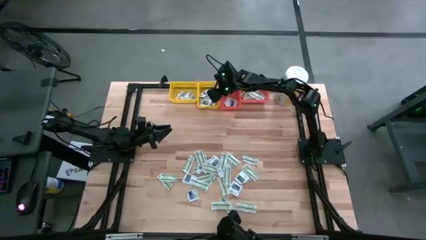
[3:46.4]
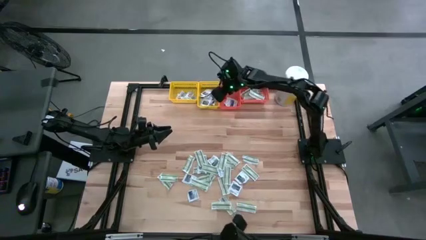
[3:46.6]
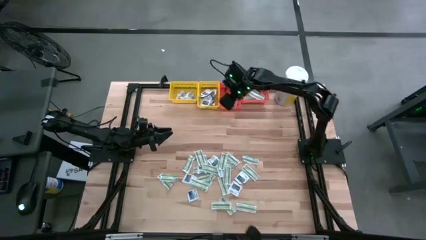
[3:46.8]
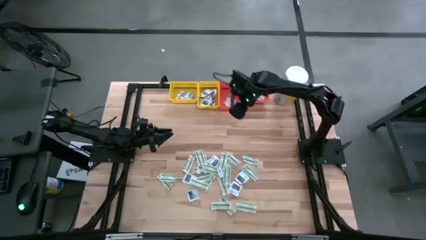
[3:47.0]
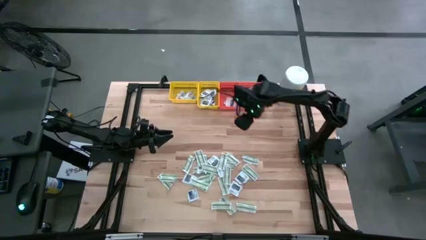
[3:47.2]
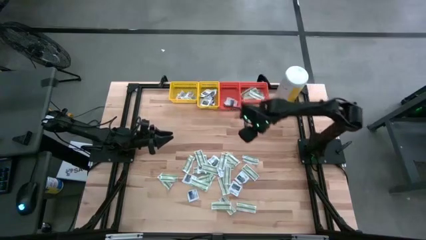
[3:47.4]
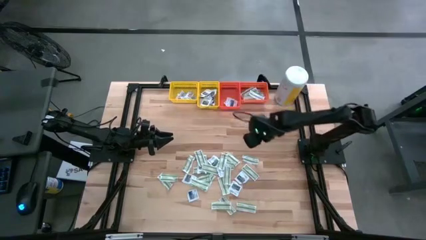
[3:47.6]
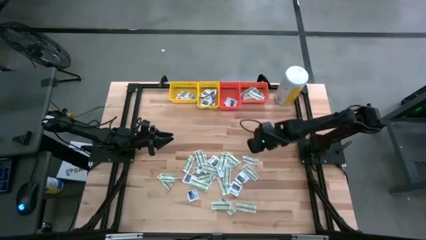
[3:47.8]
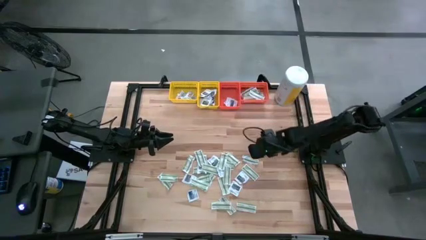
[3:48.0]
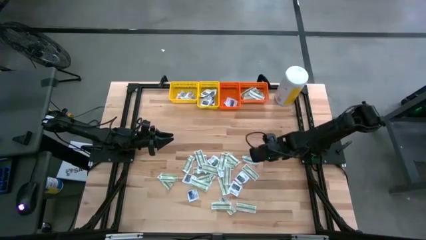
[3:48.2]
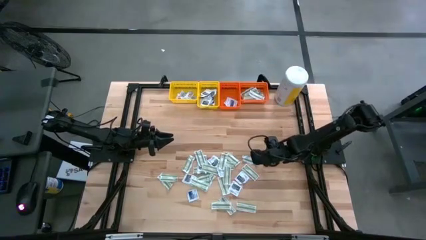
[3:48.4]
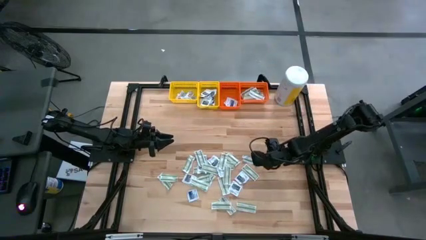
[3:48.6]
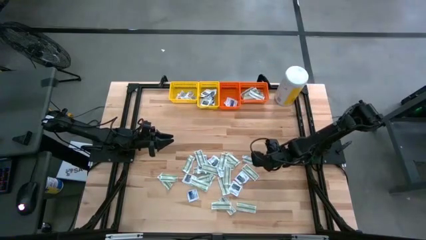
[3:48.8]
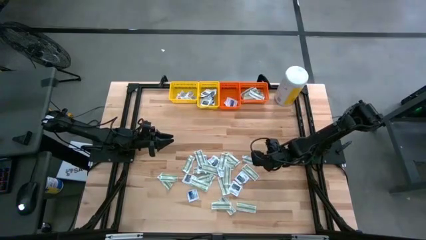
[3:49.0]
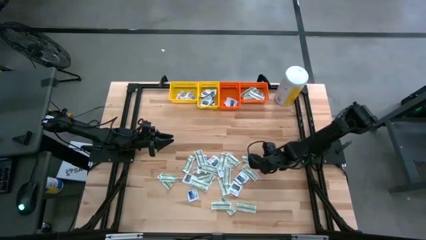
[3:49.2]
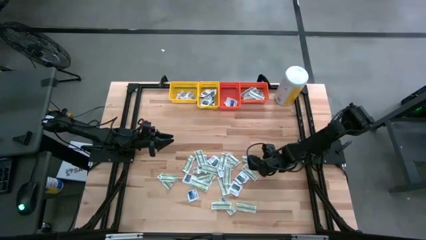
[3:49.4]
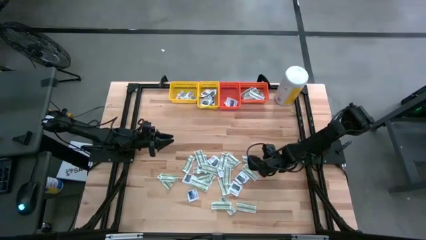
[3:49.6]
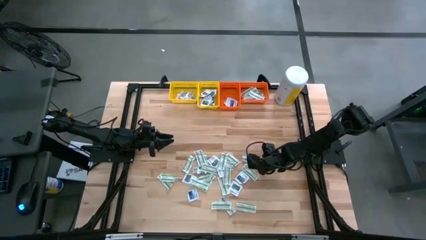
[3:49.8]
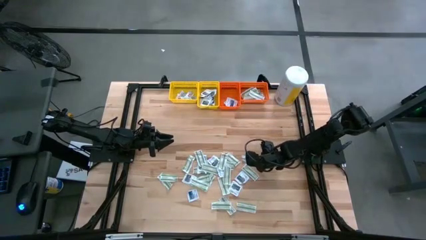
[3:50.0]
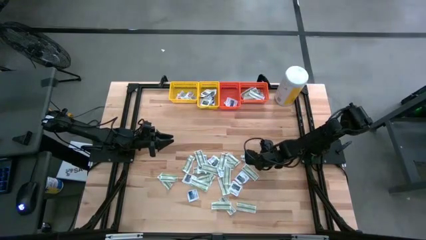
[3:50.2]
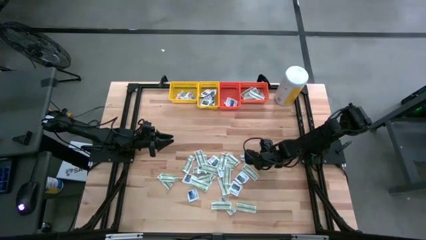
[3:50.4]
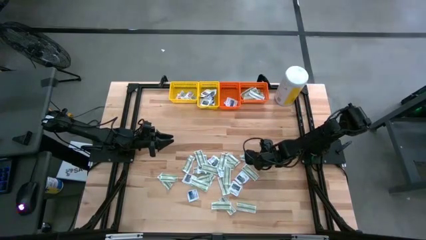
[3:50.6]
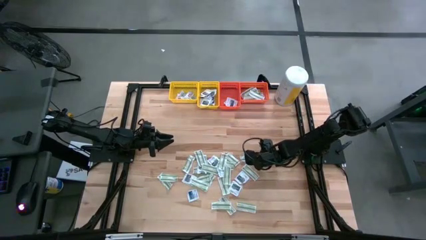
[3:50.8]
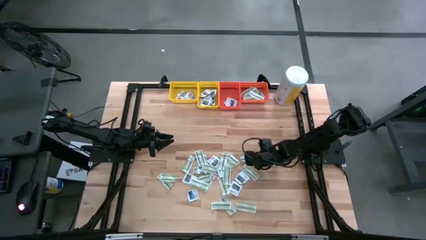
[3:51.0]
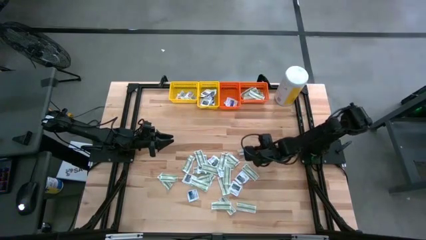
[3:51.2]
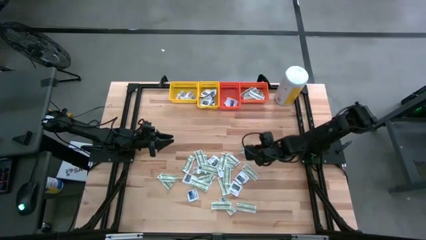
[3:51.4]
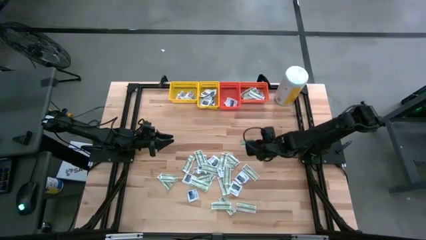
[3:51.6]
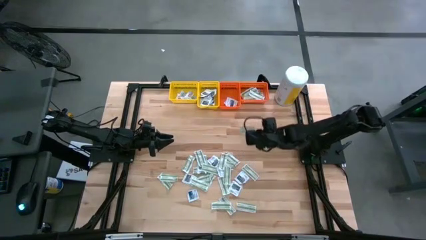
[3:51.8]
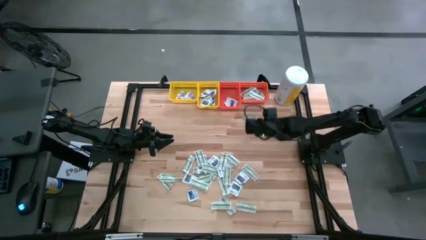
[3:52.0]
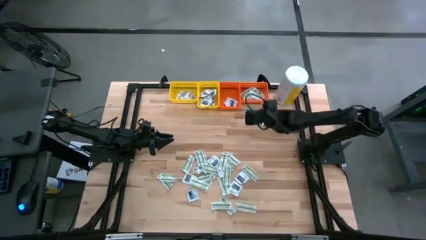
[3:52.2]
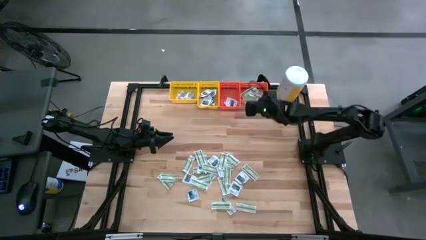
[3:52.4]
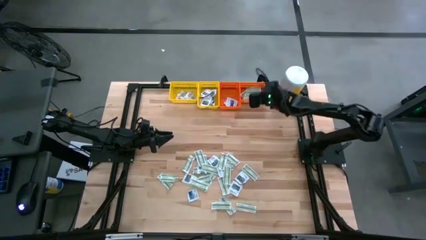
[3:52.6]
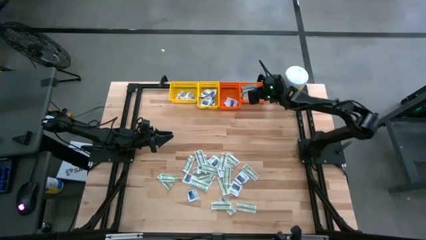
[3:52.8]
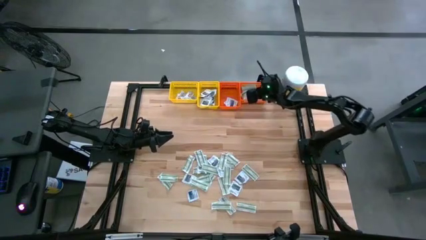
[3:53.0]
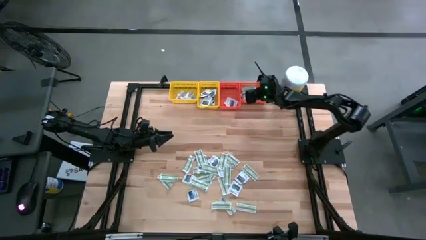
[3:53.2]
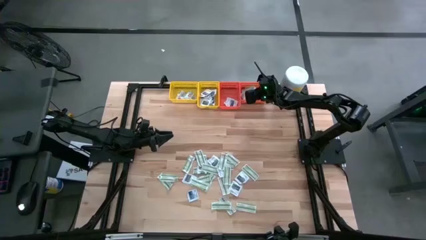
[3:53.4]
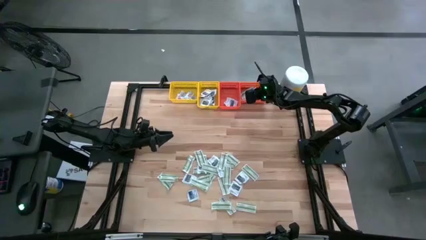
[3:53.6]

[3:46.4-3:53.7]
Task: Pick & Place First Aid Supplies
Put the green pad into the right orange bin

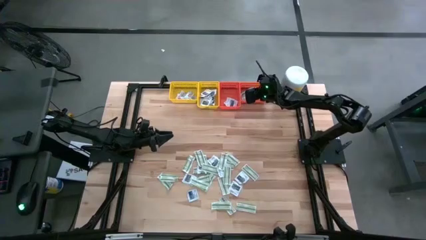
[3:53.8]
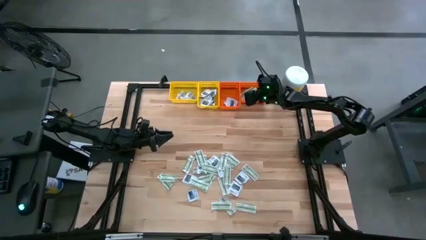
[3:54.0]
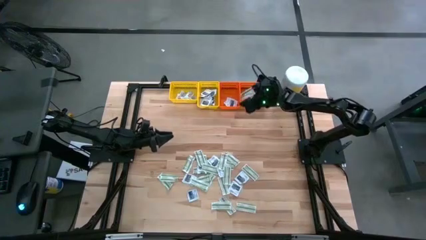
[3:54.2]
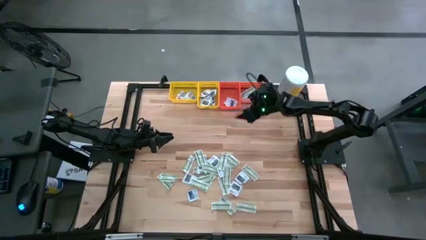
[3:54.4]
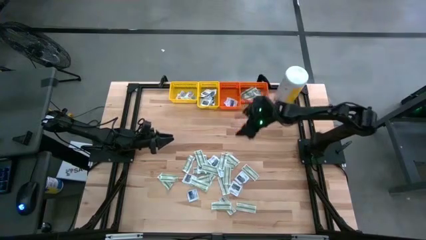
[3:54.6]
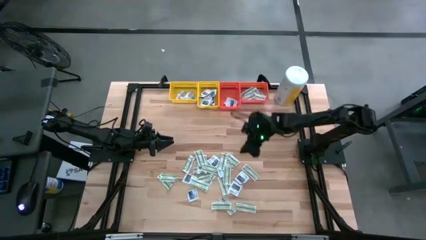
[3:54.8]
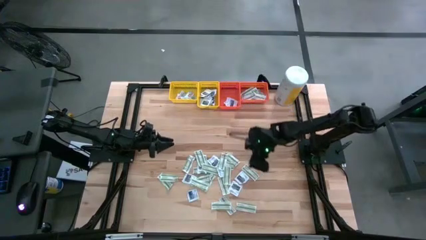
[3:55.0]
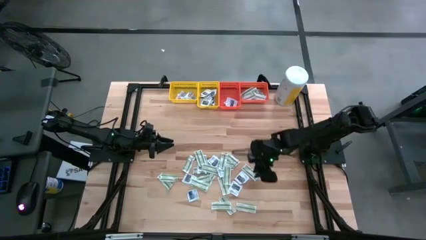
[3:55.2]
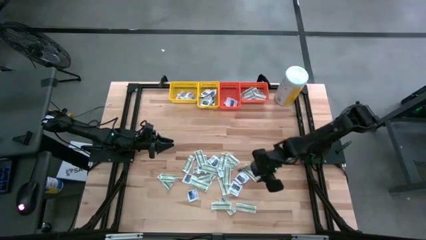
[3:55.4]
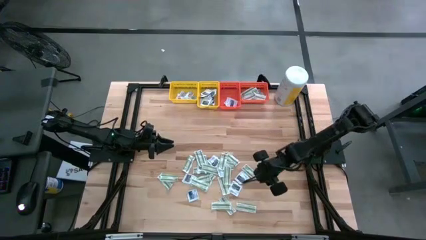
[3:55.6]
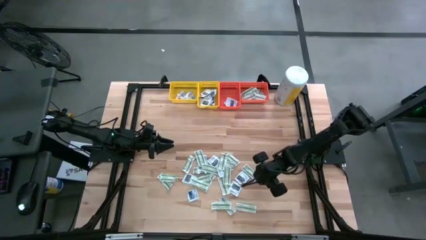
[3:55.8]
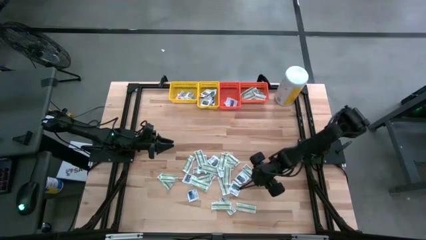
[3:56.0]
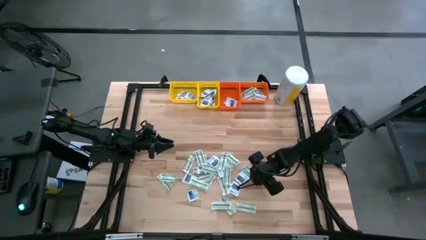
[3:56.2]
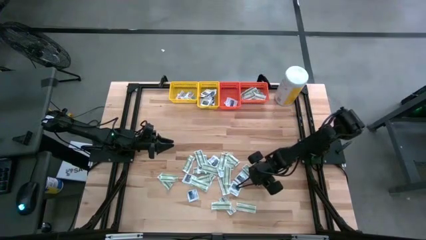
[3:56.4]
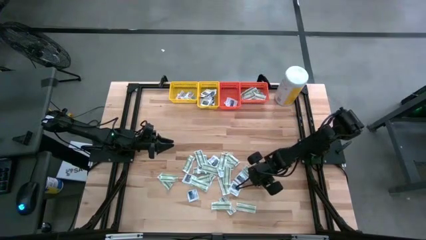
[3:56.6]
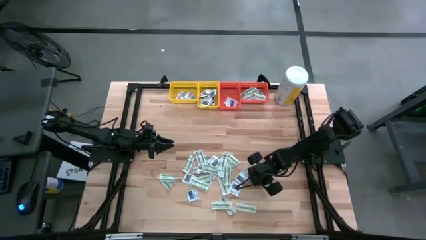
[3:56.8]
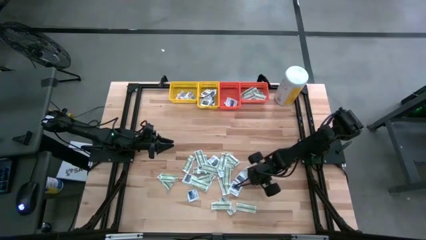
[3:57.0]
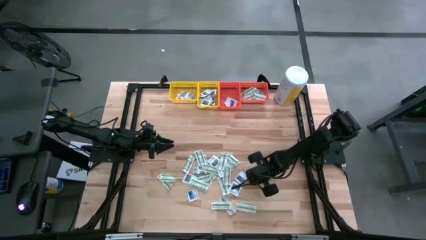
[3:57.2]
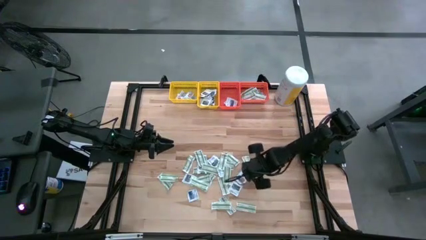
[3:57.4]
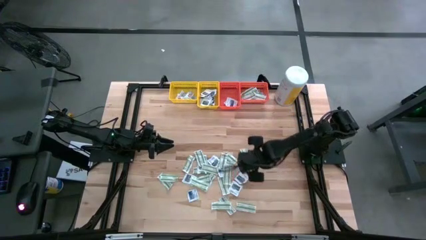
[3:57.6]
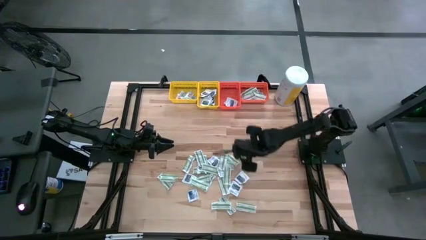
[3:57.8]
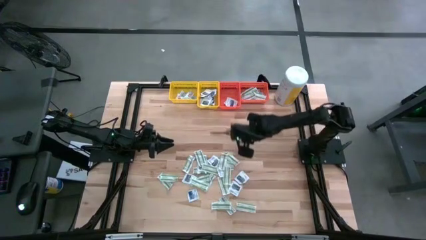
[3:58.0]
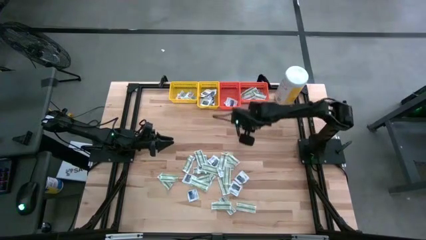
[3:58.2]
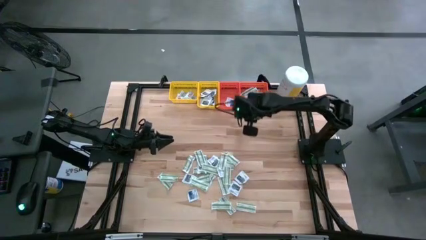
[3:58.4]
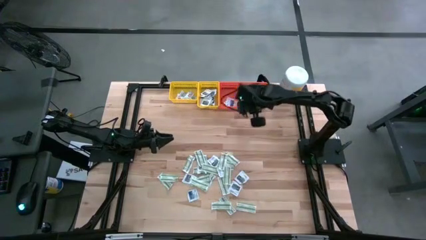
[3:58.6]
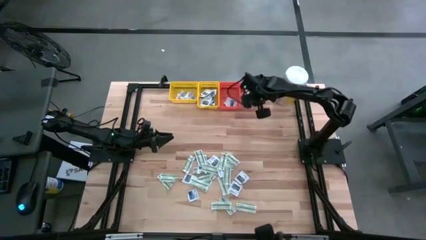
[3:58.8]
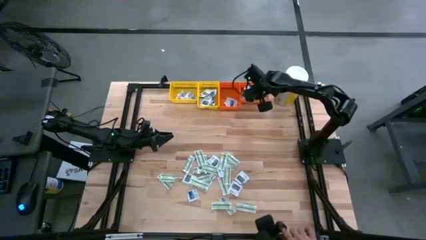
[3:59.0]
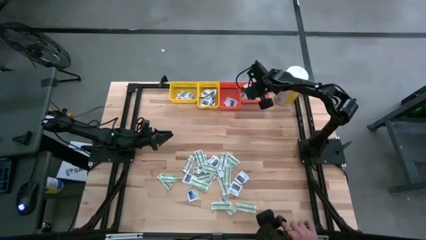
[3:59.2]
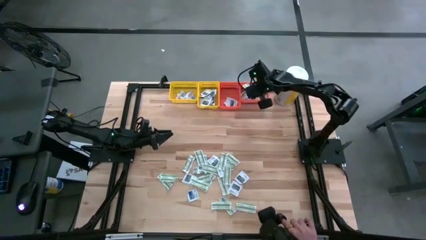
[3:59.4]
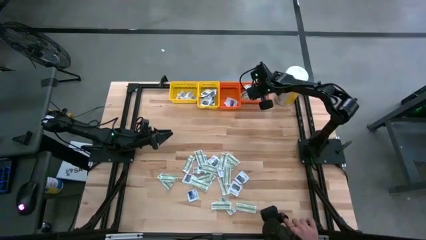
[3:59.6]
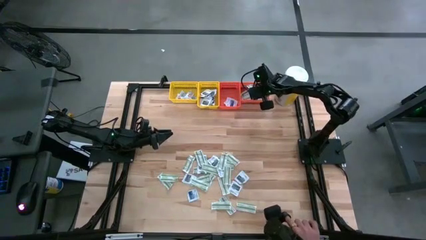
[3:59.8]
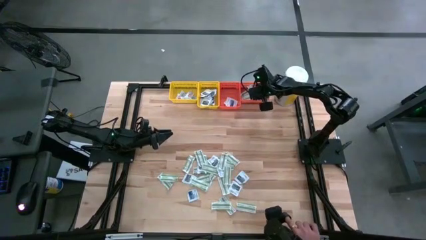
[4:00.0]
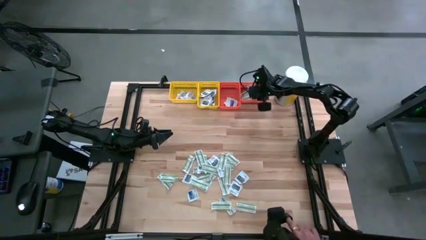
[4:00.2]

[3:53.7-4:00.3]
Put the green pad into the right orange bin

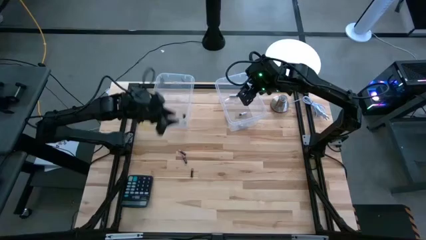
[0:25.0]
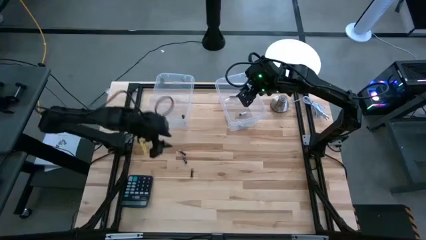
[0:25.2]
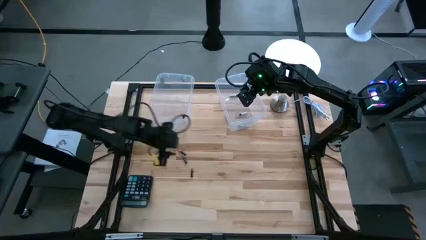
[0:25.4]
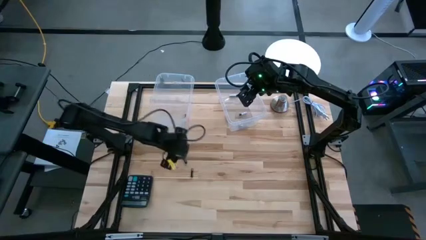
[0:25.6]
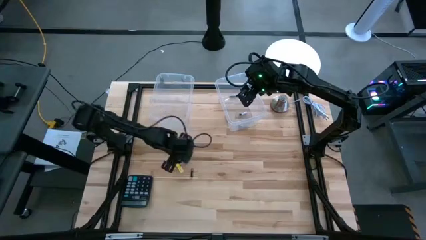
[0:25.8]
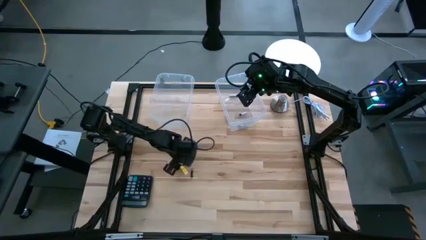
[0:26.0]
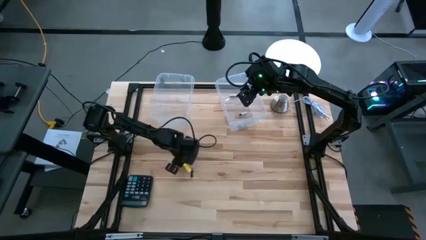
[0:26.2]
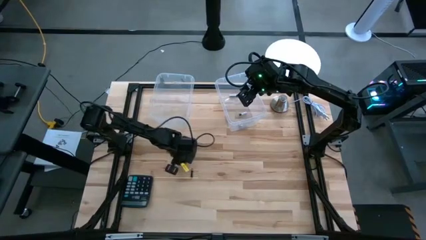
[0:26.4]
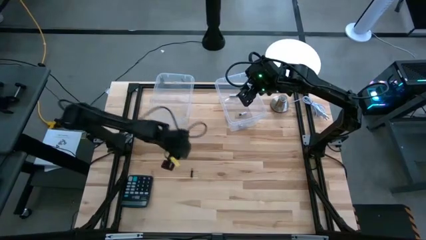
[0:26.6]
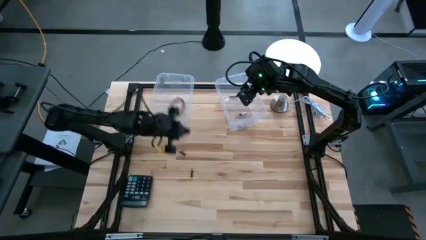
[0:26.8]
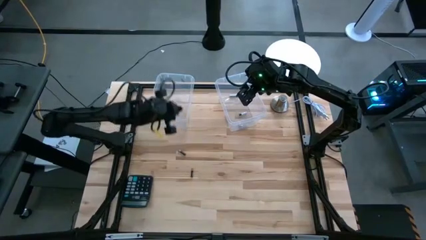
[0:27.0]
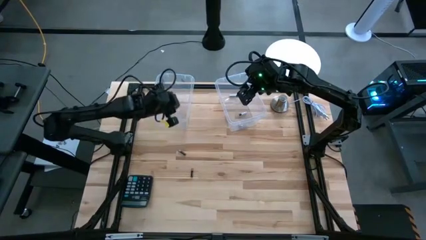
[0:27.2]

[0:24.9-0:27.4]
Task: Sort batteries
Put the black battery into the left transparent bin

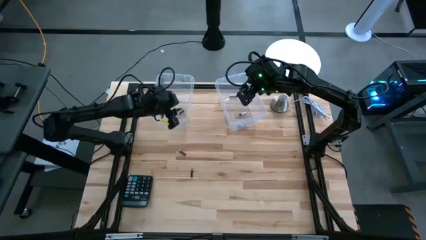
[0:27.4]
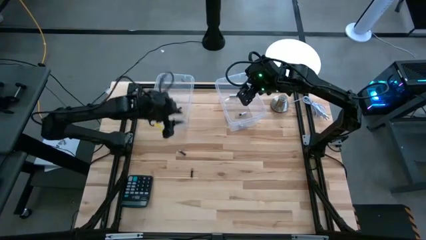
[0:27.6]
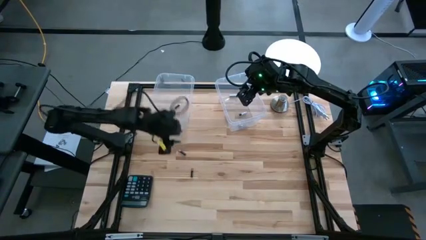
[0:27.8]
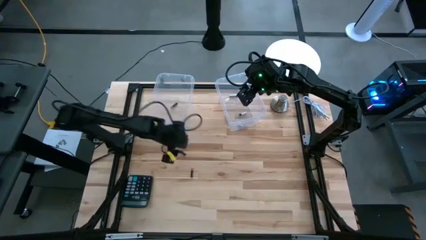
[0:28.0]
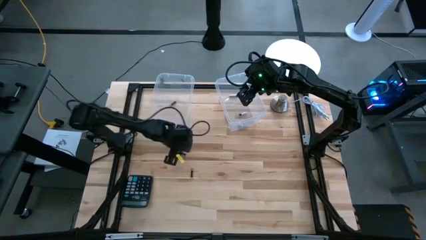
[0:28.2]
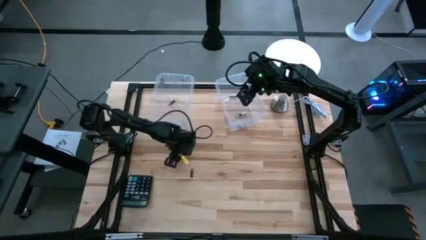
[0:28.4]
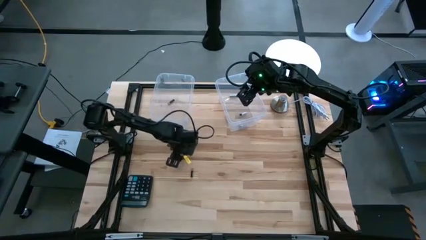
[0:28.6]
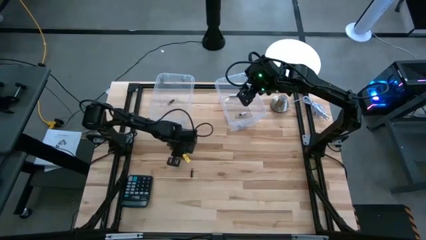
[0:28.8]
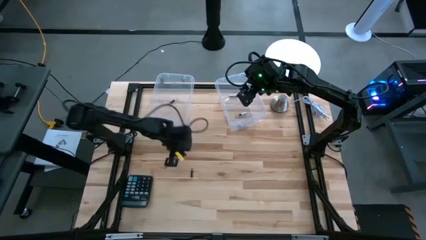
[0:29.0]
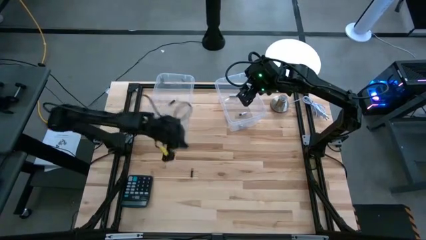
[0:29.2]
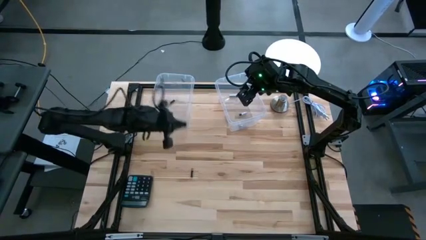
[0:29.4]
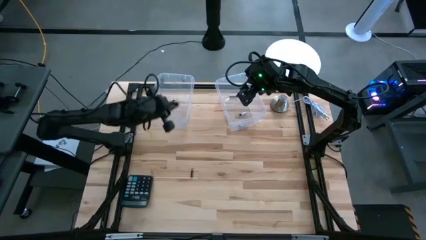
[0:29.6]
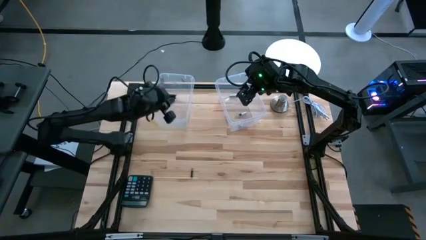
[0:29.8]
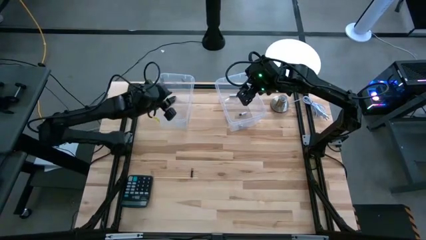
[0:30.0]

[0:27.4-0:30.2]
Put the black battery into the left transparent bin
